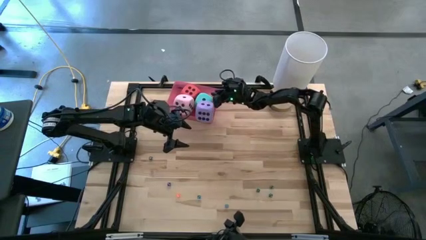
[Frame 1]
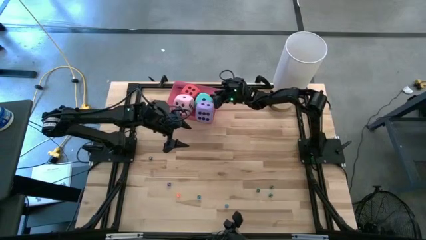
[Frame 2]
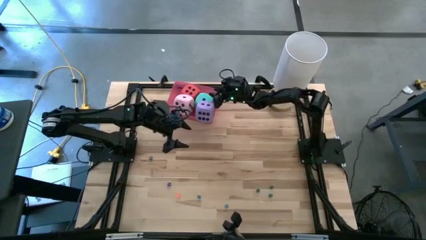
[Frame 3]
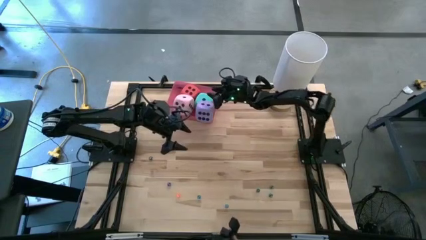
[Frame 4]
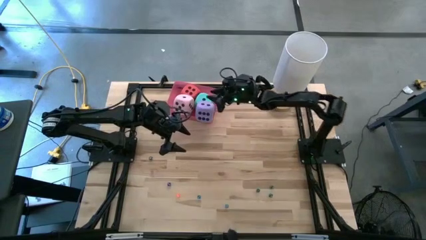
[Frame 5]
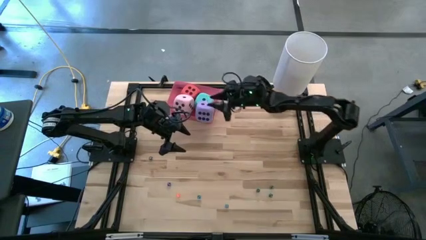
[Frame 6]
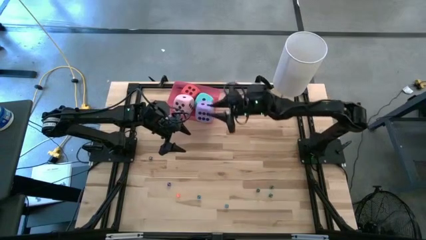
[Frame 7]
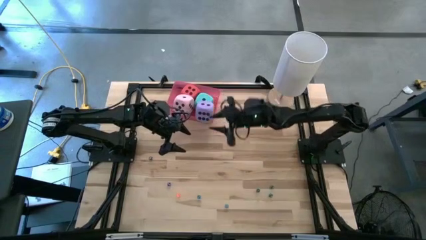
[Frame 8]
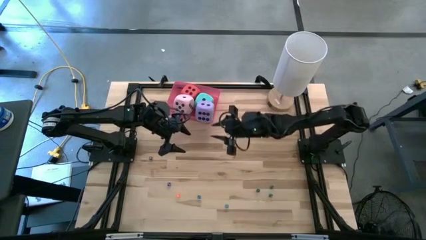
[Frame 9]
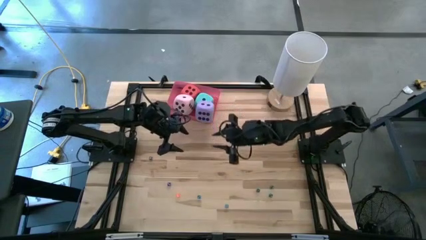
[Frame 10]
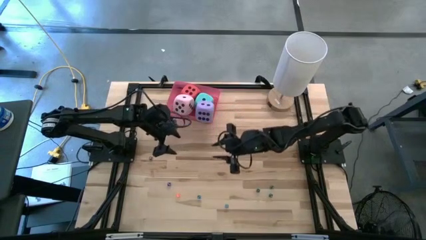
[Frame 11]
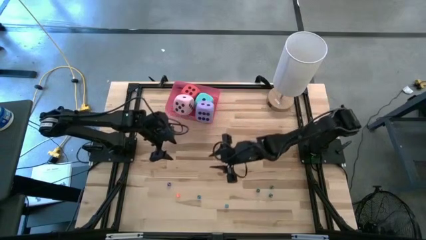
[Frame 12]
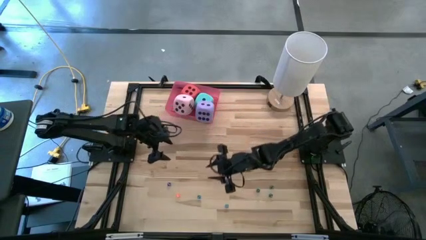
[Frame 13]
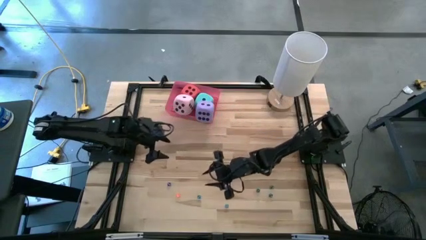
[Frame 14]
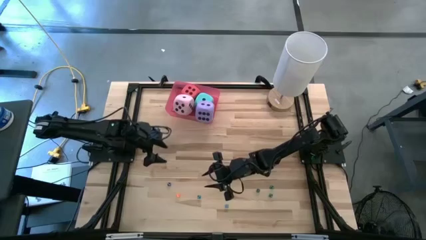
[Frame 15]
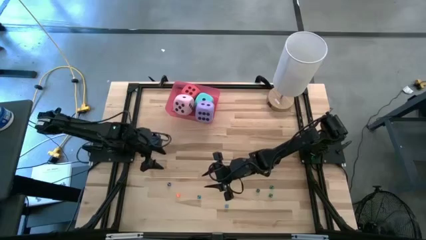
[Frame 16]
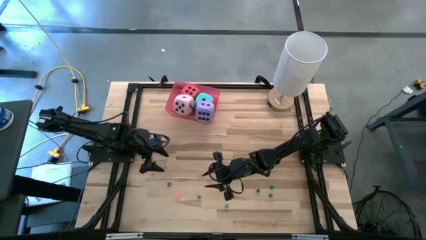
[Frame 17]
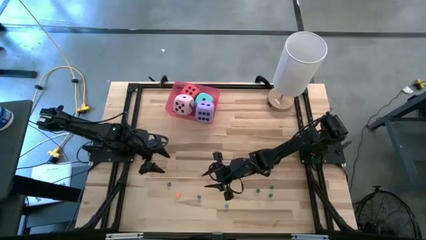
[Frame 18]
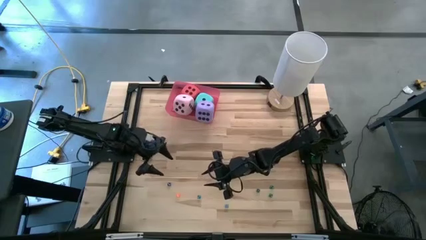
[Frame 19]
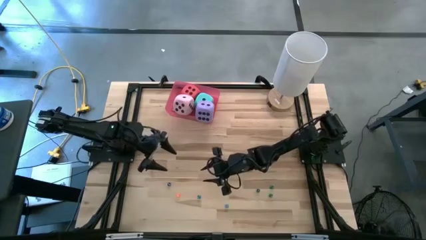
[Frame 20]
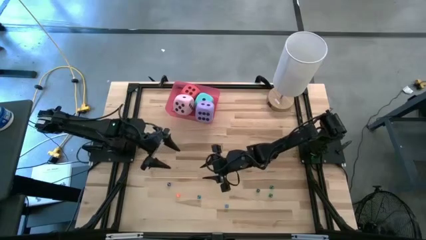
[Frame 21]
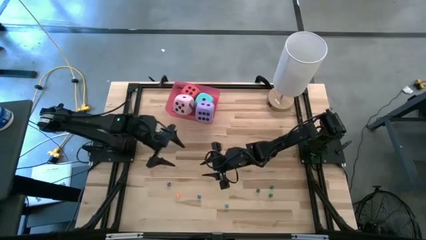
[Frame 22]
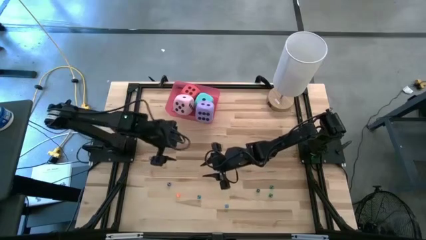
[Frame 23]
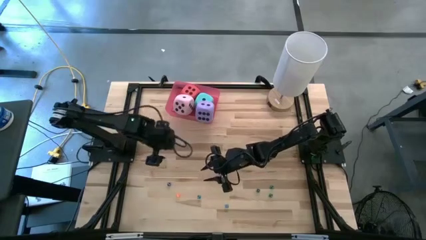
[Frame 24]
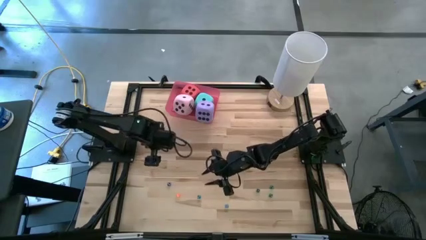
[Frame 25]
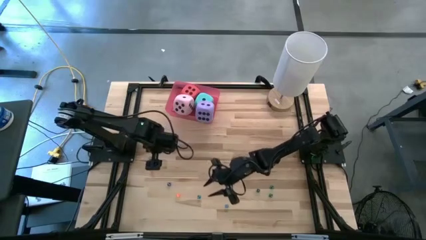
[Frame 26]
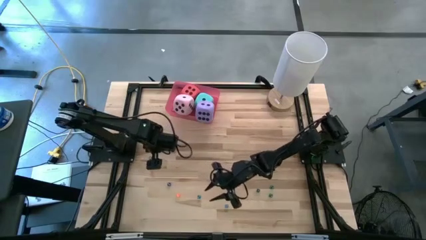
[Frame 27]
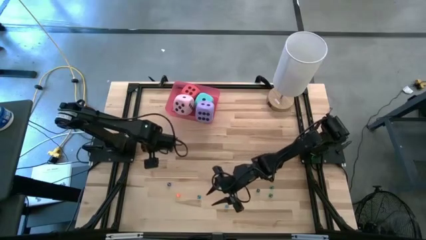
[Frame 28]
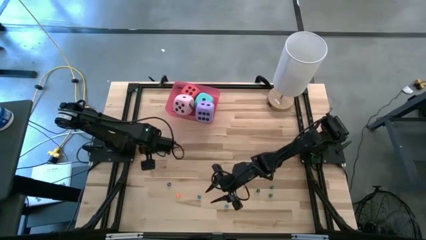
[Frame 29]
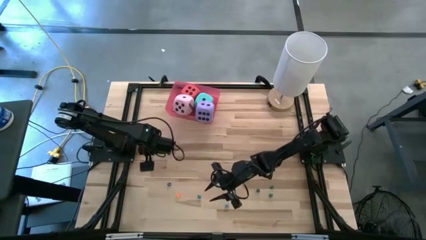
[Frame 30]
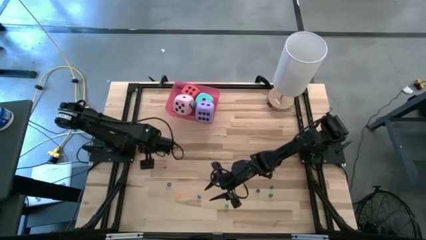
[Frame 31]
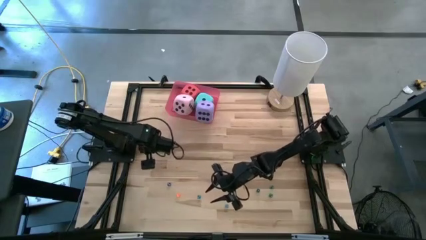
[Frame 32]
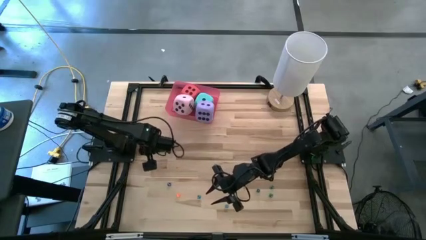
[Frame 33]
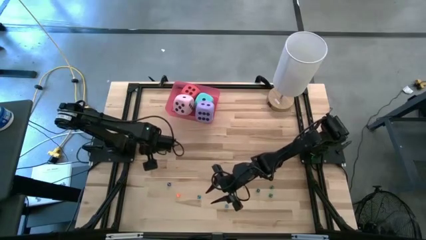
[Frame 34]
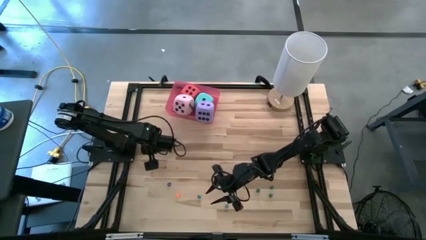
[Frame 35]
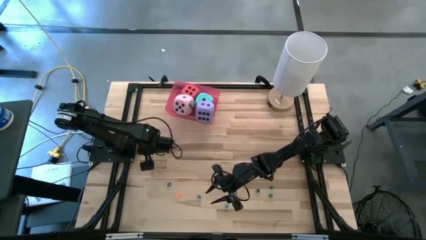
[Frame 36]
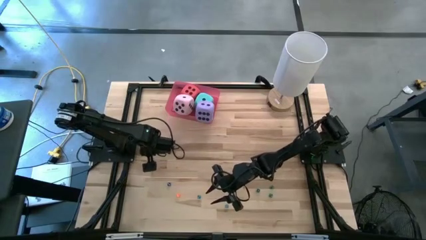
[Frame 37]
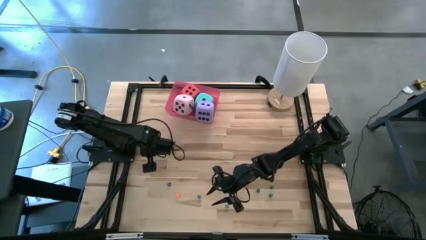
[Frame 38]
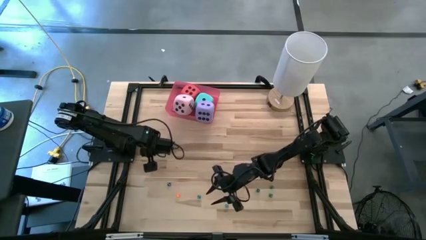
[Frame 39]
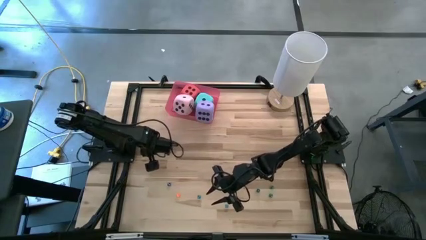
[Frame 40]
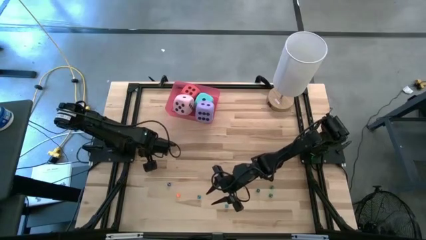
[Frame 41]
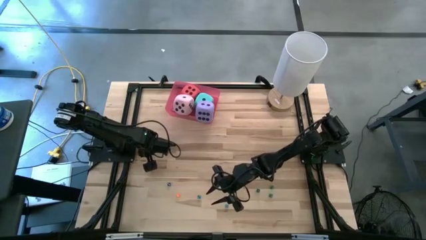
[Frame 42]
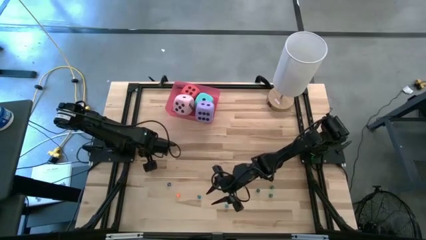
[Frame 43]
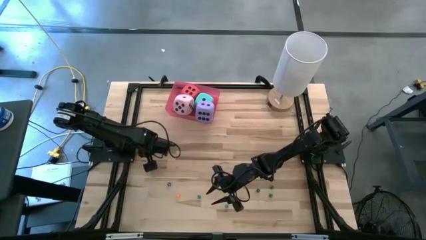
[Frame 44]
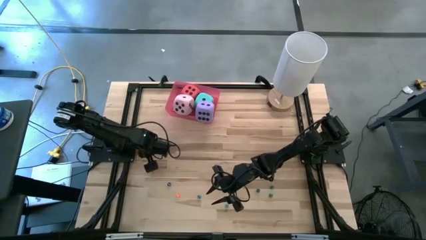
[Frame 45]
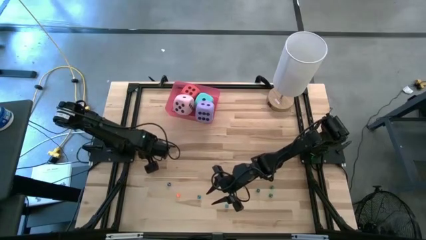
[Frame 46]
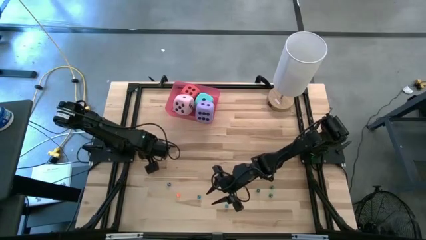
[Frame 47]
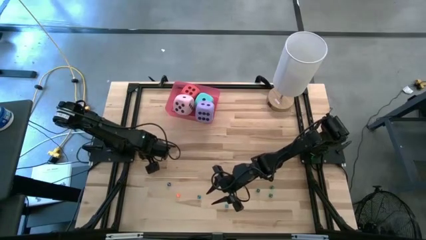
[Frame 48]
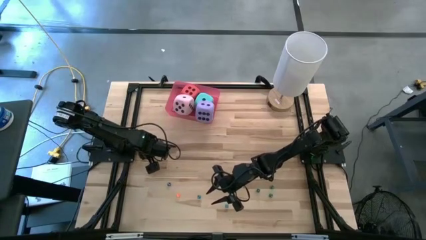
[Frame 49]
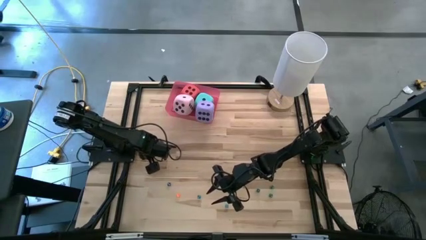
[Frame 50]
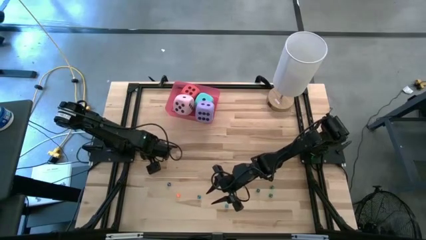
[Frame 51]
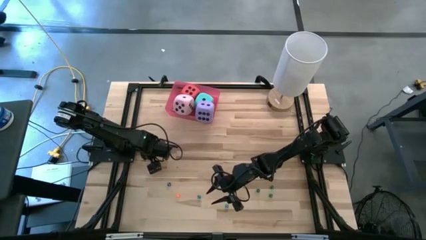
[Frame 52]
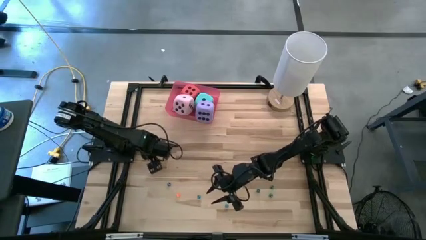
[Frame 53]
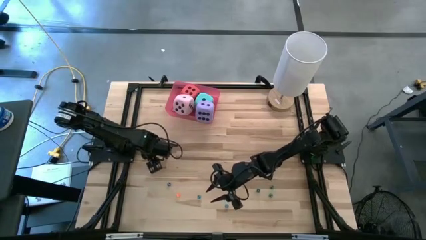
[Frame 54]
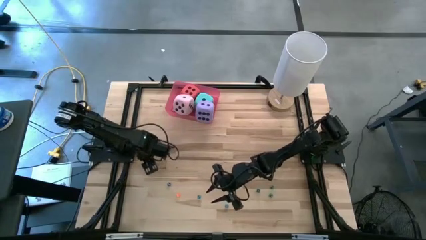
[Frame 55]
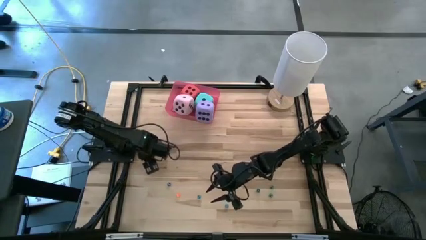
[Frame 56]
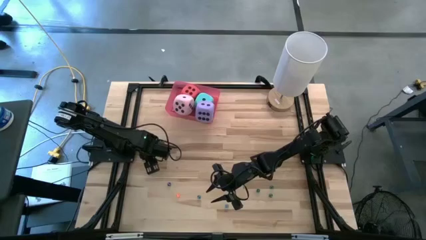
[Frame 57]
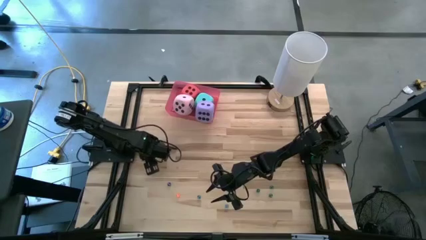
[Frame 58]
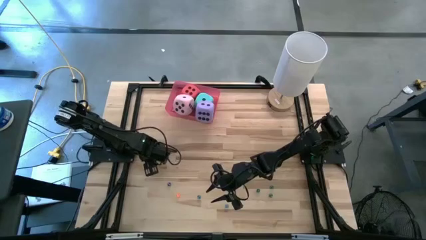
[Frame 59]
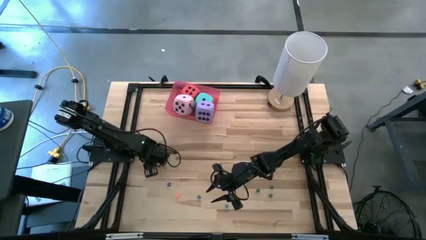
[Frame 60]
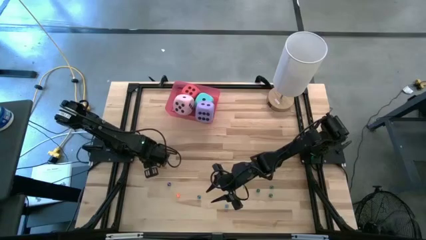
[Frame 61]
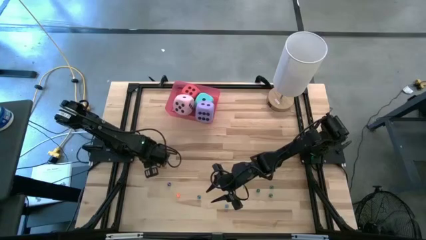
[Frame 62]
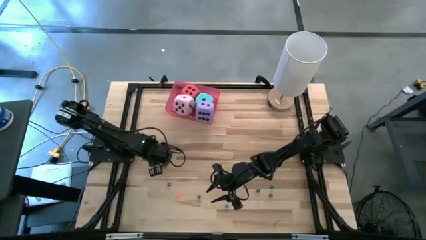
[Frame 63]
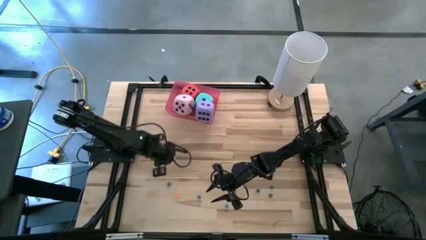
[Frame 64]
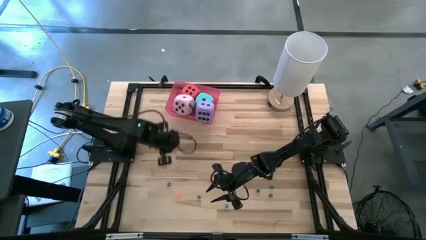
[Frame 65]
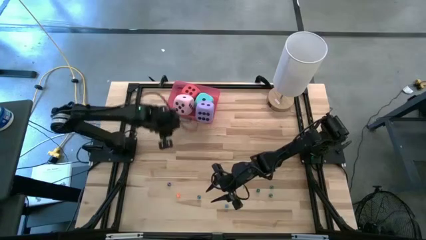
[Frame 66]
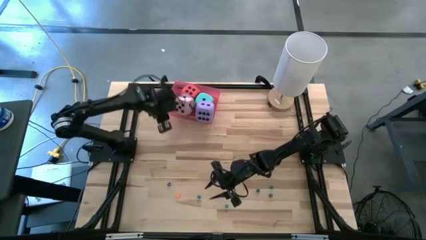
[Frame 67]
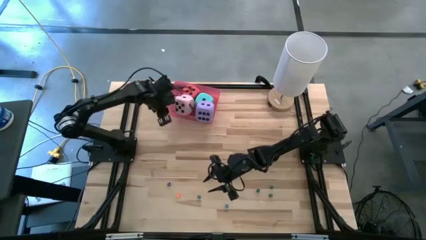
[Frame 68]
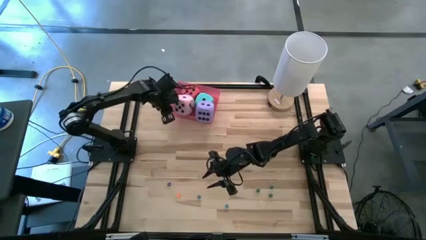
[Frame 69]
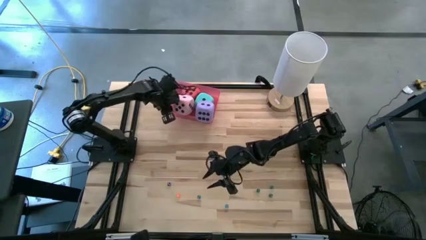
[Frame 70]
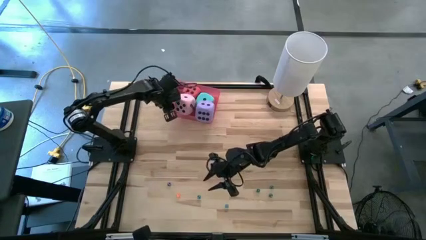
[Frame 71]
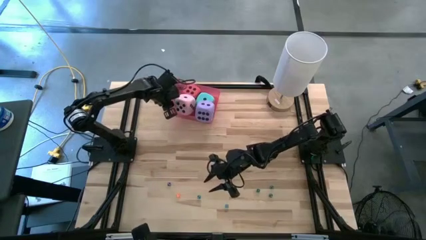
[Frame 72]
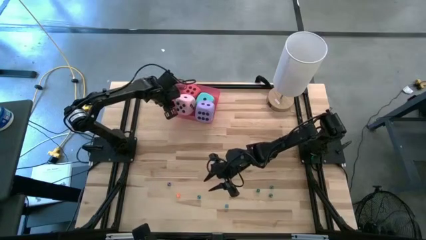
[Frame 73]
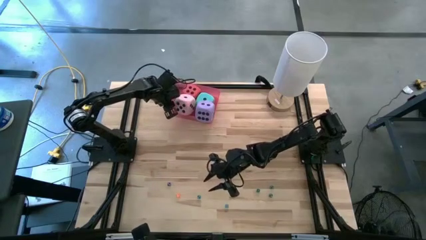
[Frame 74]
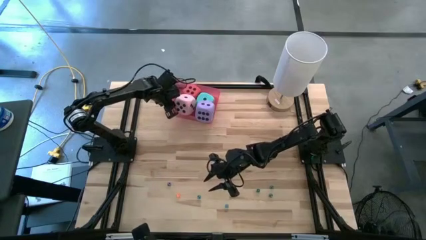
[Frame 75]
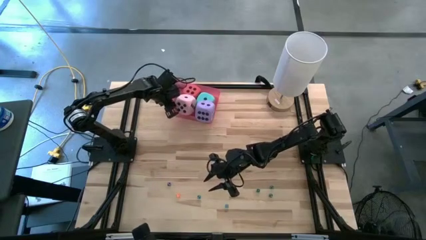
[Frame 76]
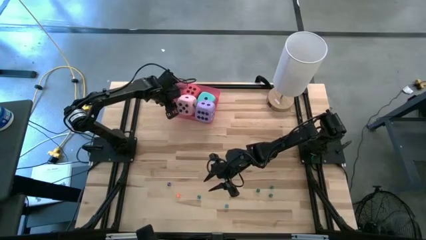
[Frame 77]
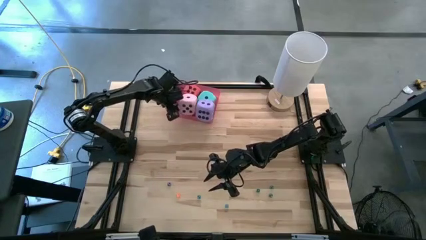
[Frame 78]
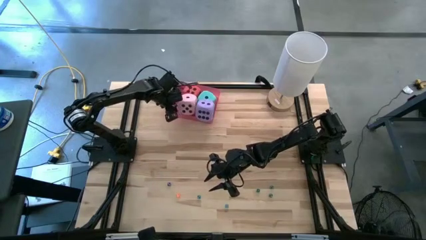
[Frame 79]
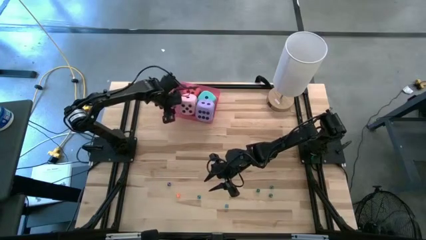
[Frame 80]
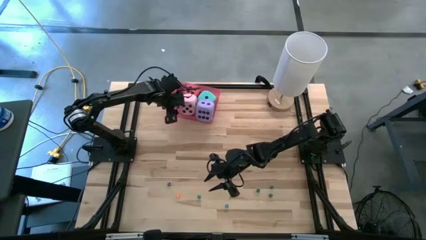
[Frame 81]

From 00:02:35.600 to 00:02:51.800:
Task: Pick & Place Dice
Put the small black dice into the pink bin
